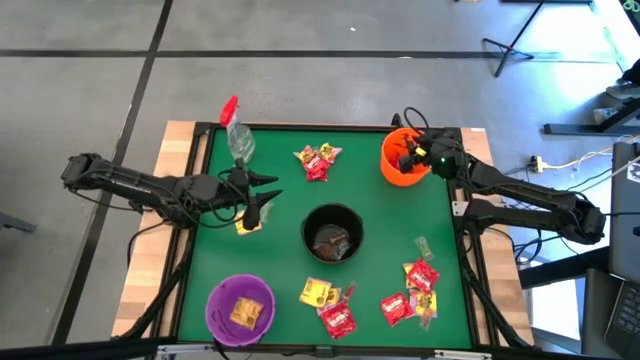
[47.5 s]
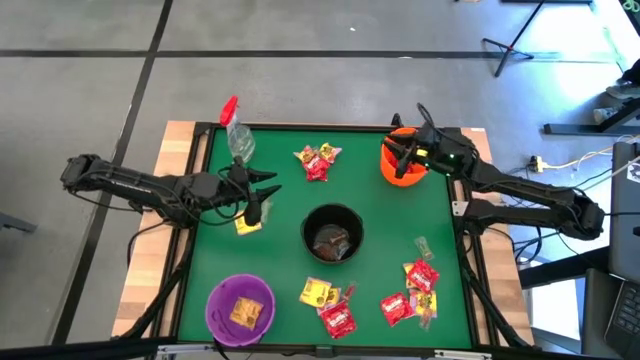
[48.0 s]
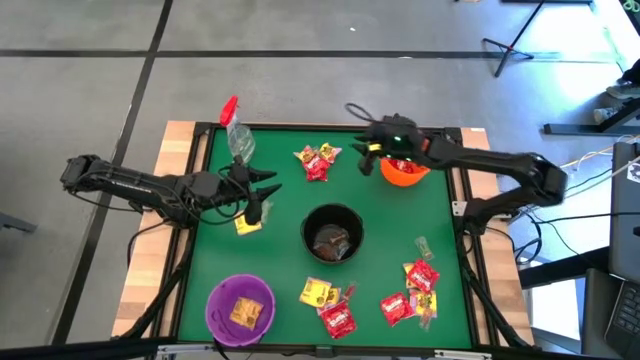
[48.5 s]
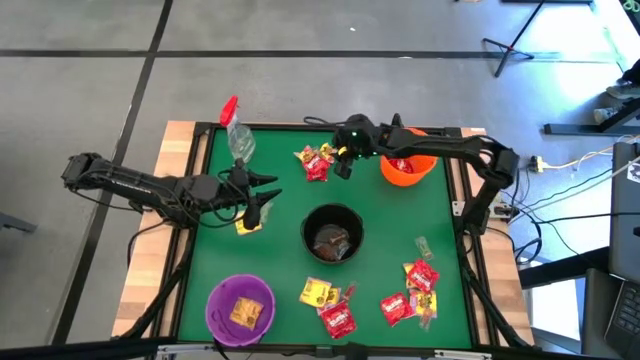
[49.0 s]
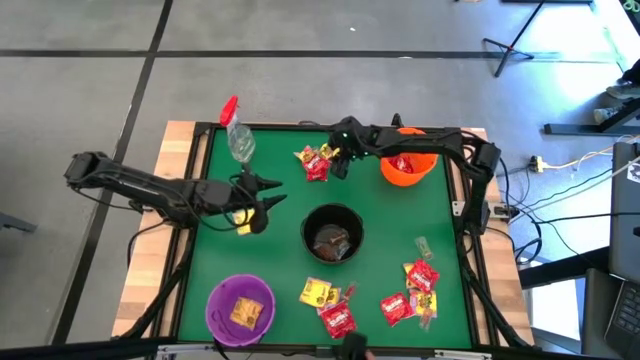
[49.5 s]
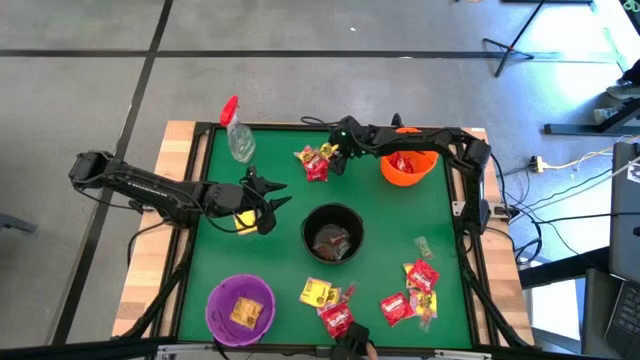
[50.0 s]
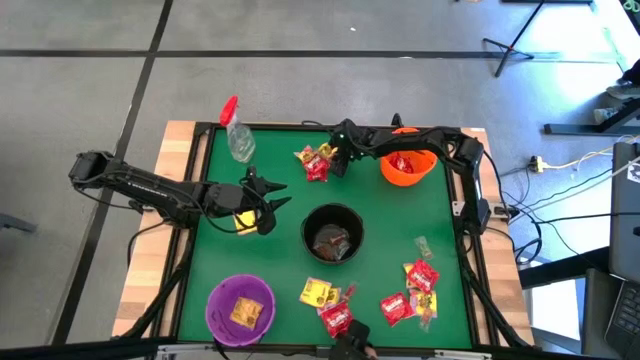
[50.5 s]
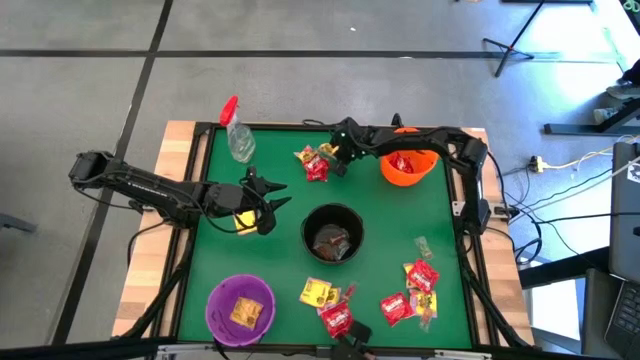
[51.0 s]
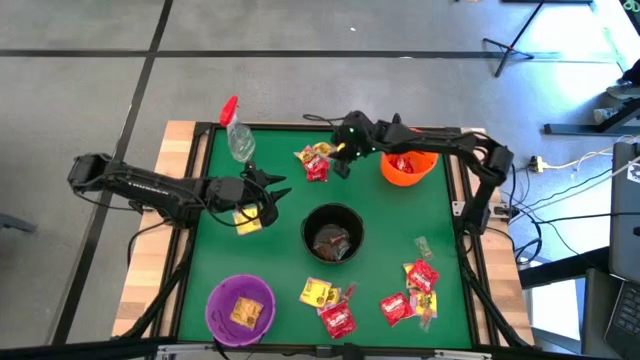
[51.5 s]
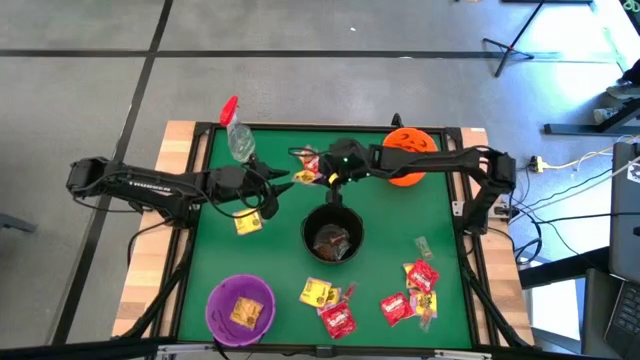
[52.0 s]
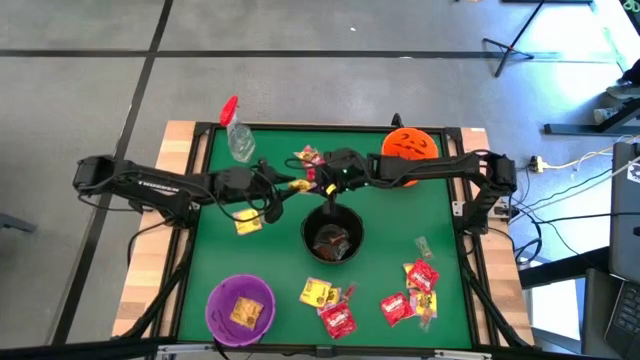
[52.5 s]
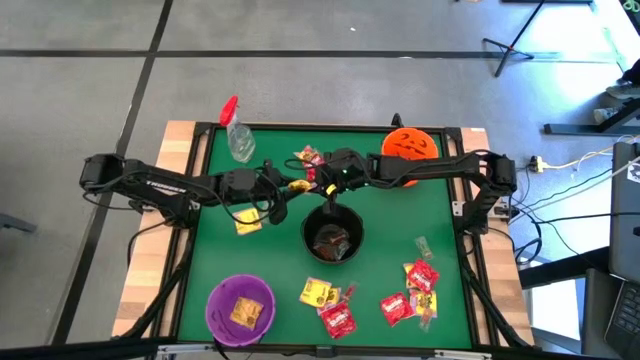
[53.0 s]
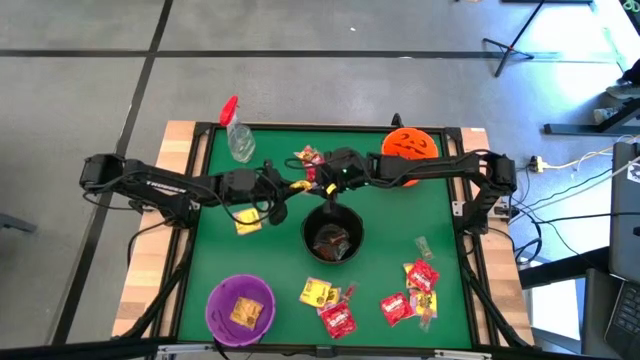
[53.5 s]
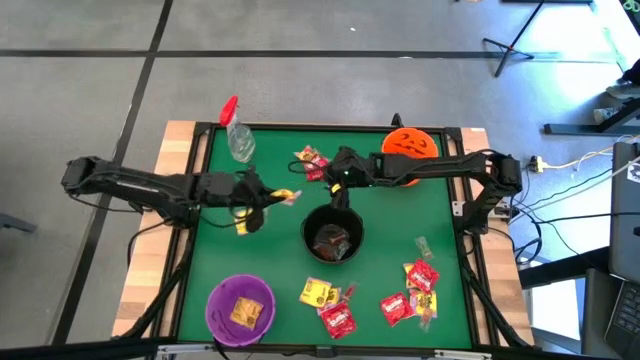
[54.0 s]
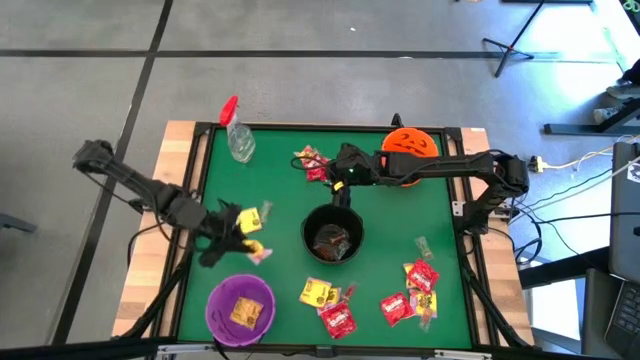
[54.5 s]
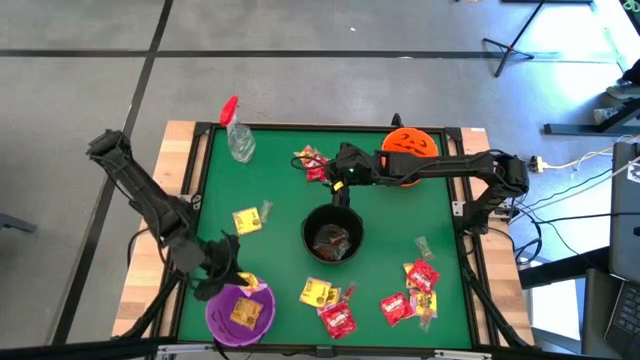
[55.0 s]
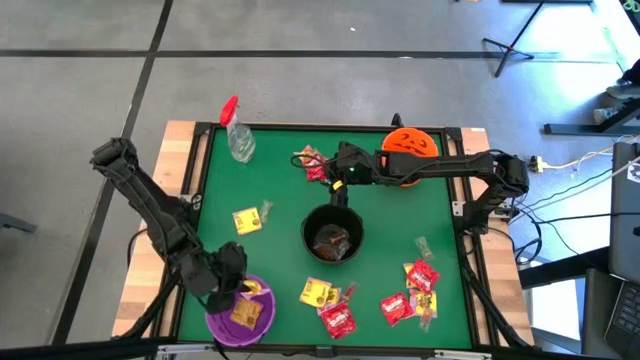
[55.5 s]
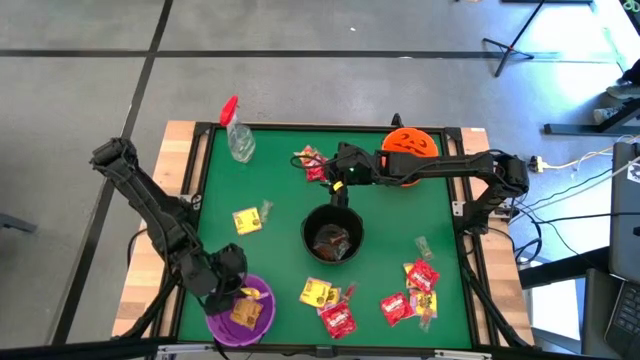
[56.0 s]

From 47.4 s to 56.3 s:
Task: Sort candy
Put the yellow candy into the purple bucket

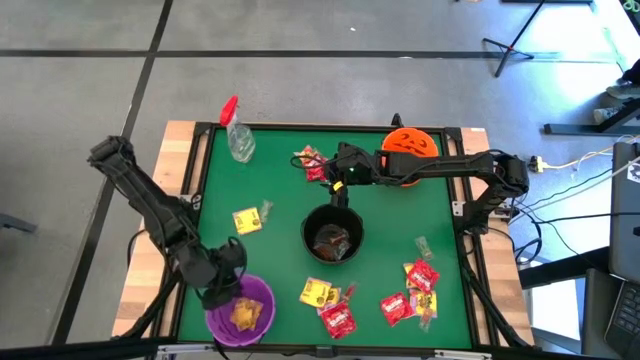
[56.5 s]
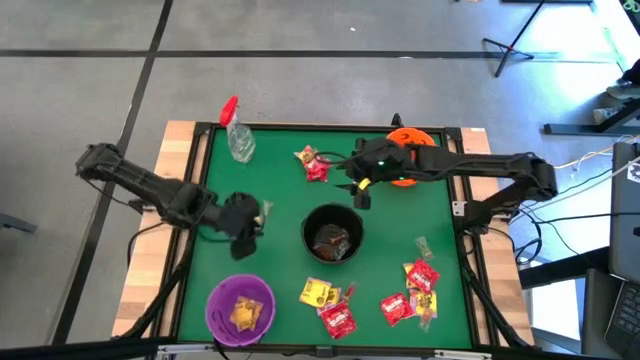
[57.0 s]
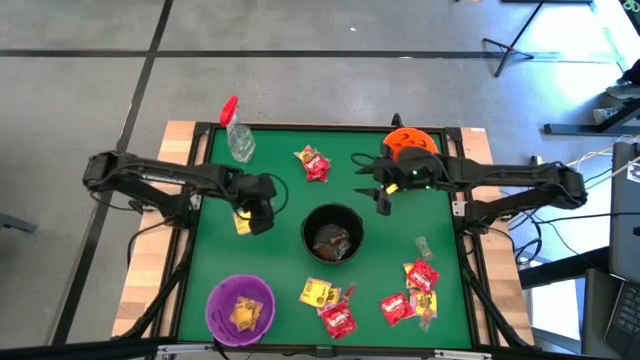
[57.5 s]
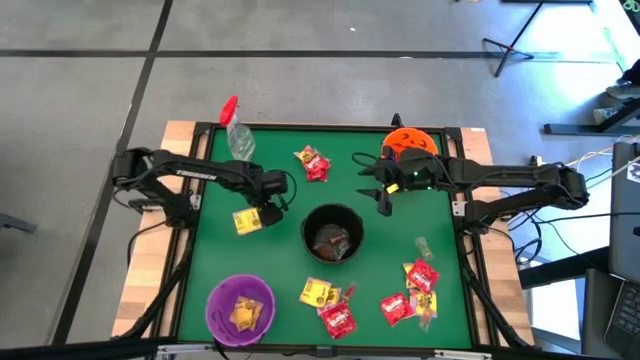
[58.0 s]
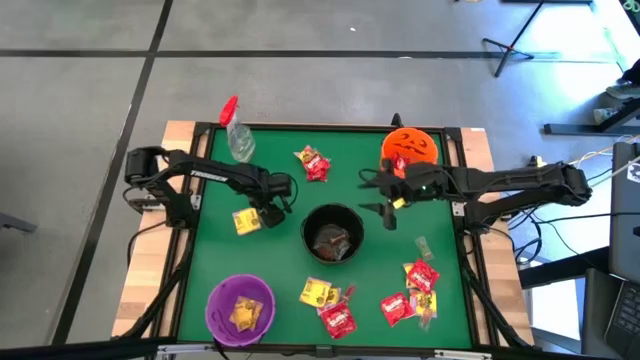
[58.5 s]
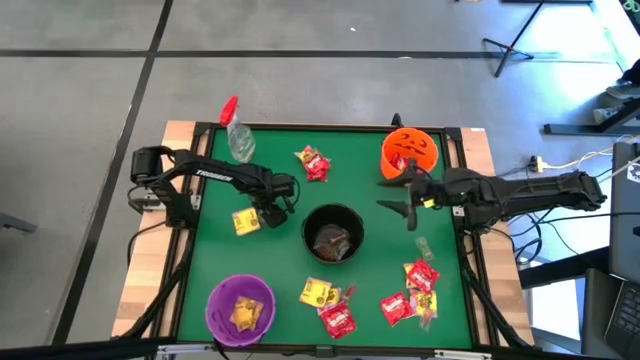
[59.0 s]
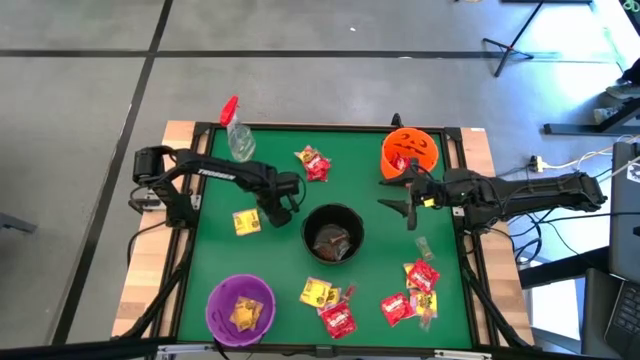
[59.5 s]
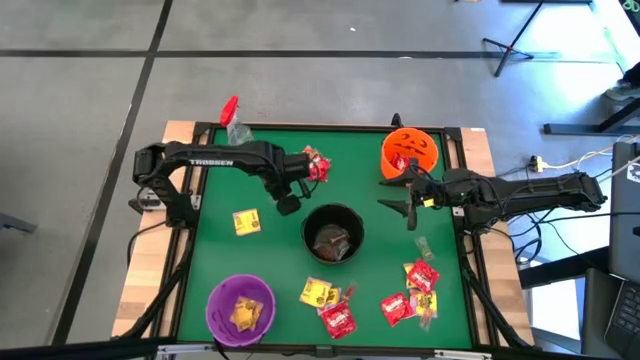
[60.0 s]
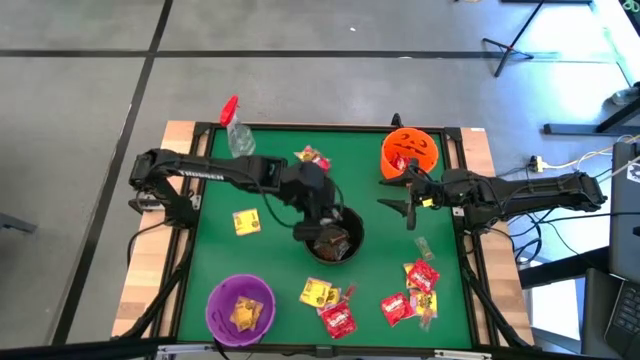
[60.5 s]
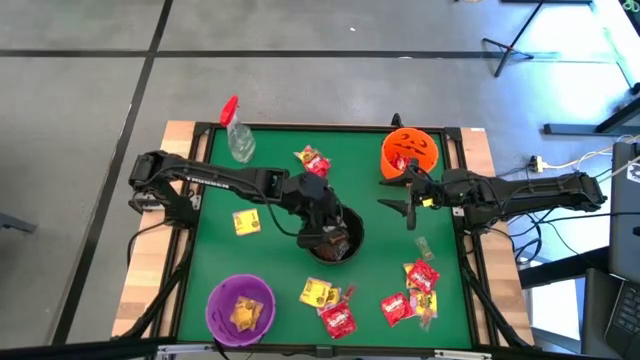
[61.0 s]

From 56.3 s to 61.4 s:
Put the green candy into the black bucket

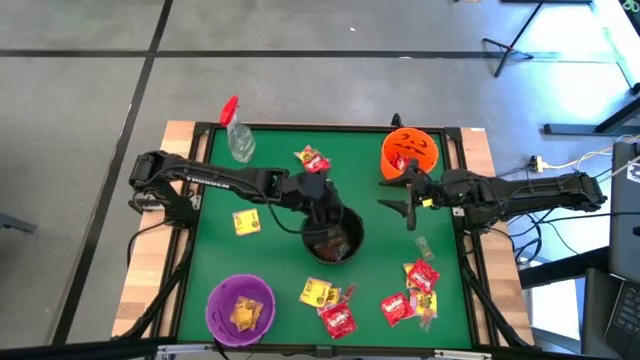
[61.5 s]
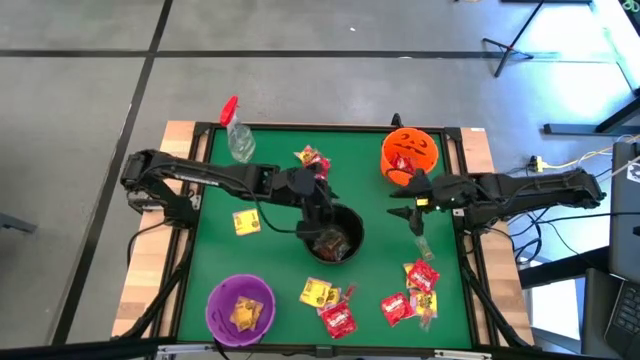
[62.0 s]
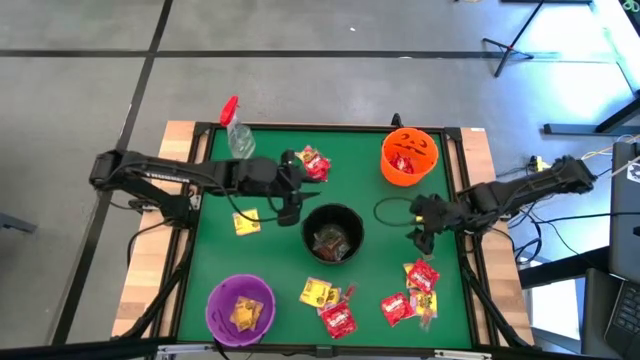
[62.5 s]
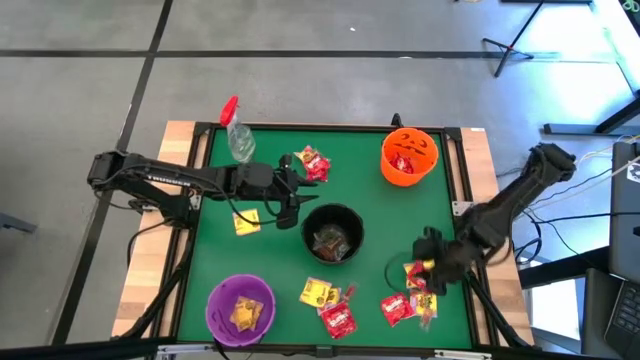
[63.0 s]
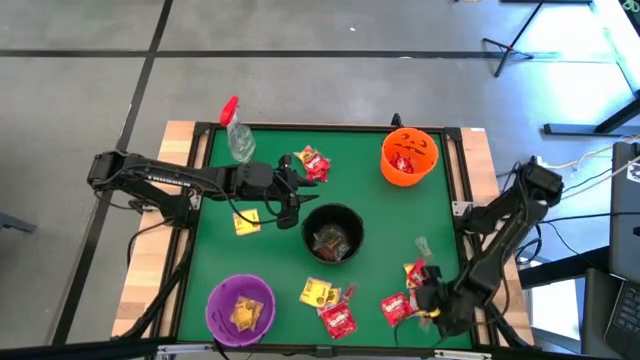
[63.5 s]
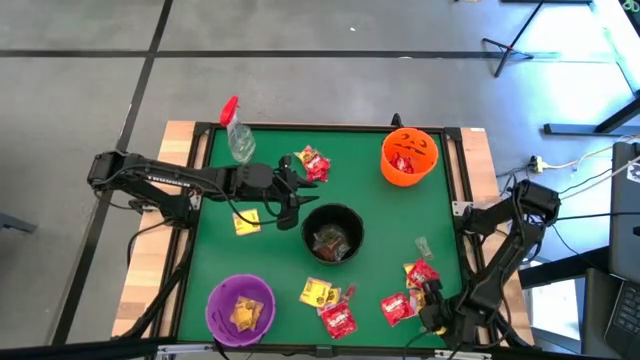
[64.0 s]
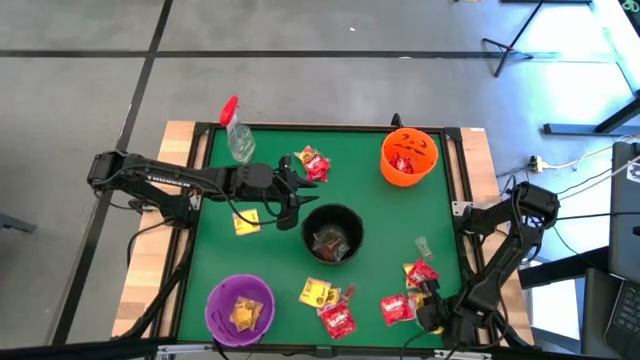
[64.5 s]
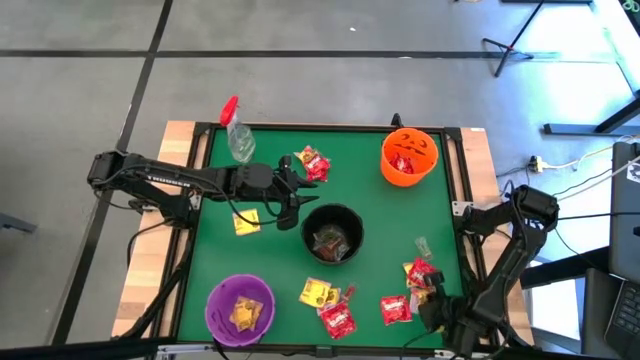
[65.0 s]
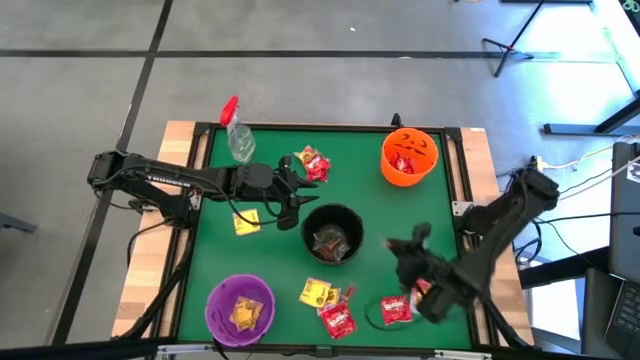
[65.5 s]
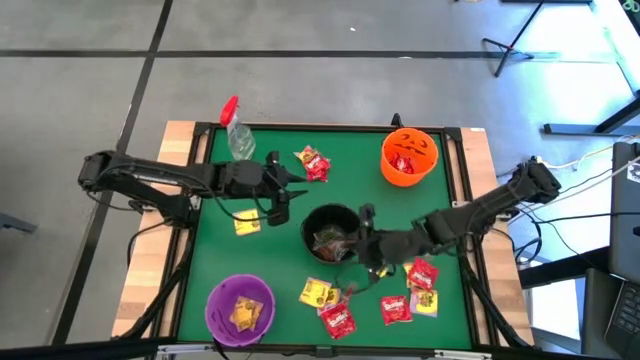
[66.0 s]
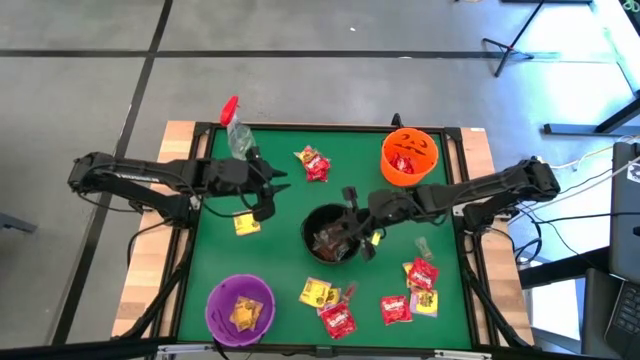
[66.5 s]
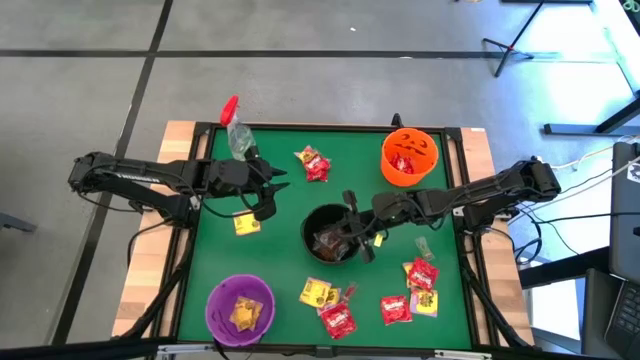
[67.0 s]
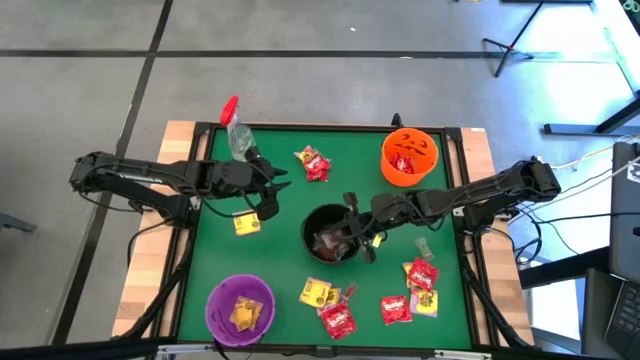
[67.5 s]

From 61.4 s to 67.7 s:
Put the orange candy into the black bucket
